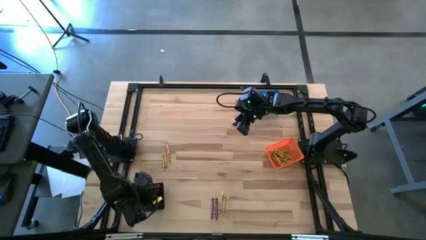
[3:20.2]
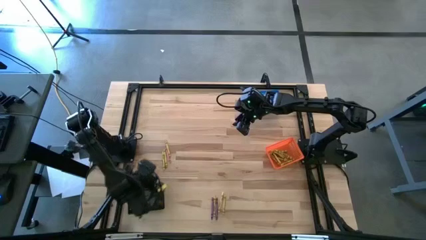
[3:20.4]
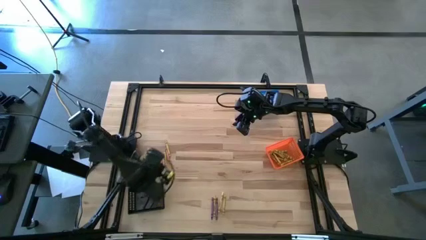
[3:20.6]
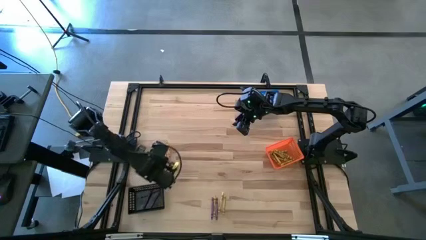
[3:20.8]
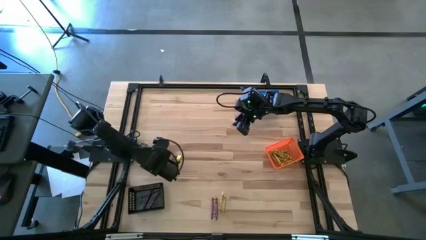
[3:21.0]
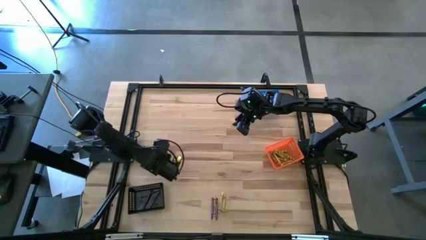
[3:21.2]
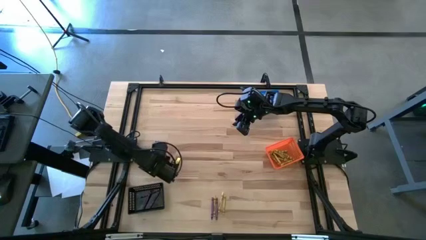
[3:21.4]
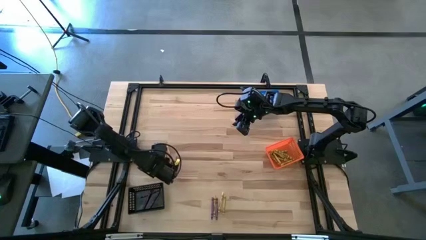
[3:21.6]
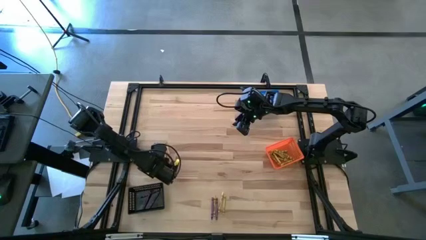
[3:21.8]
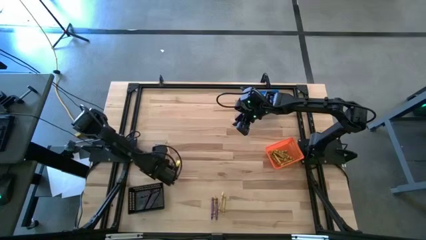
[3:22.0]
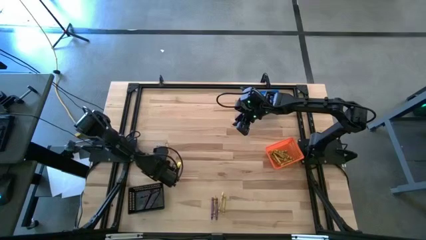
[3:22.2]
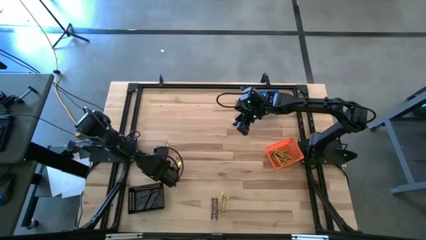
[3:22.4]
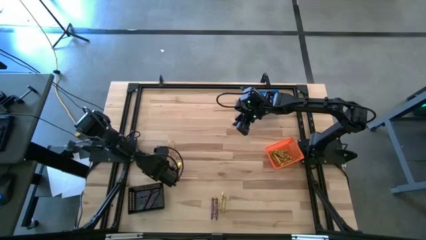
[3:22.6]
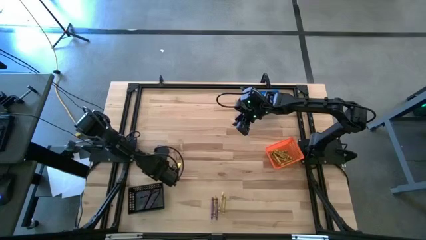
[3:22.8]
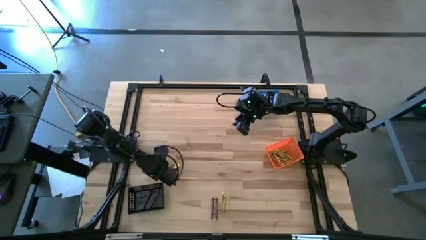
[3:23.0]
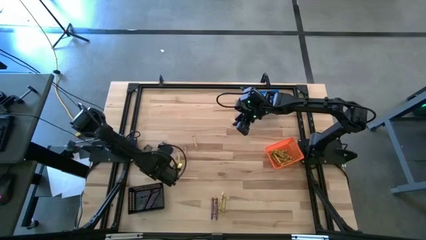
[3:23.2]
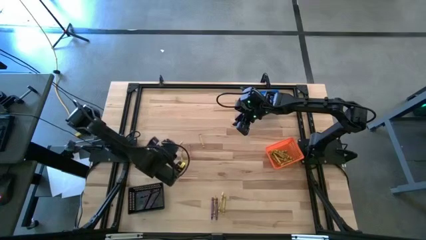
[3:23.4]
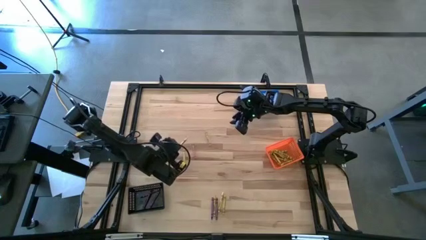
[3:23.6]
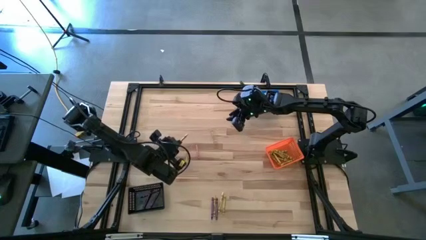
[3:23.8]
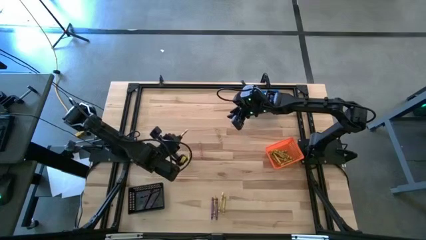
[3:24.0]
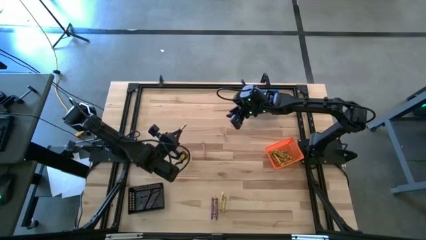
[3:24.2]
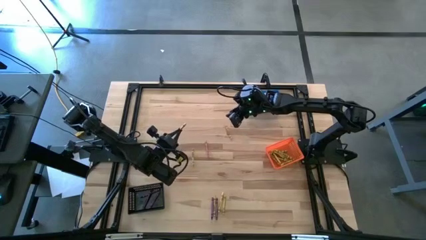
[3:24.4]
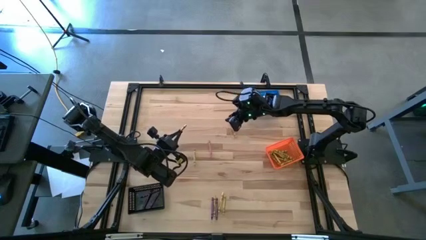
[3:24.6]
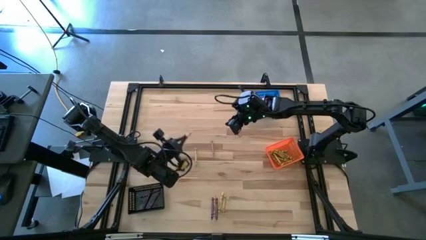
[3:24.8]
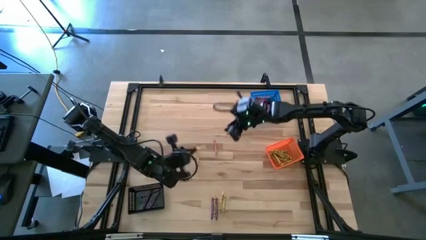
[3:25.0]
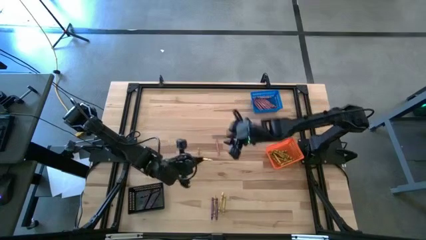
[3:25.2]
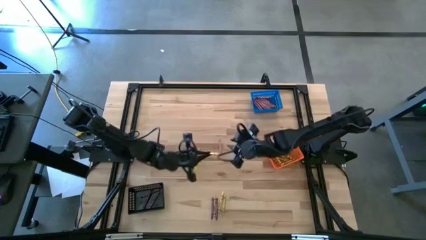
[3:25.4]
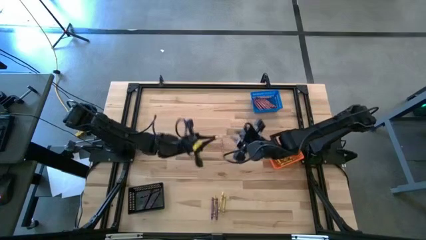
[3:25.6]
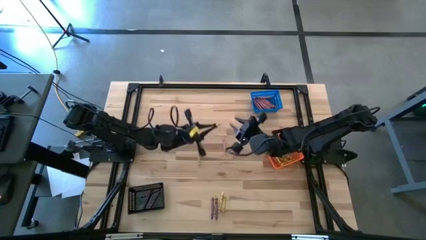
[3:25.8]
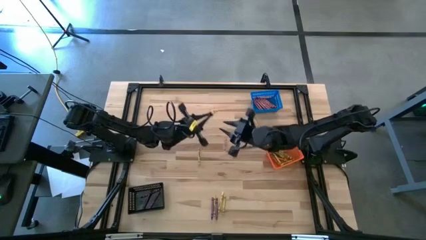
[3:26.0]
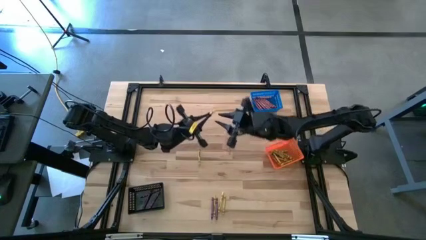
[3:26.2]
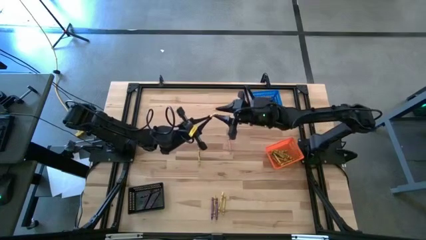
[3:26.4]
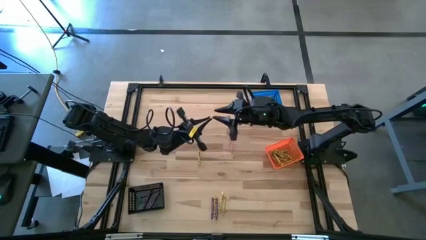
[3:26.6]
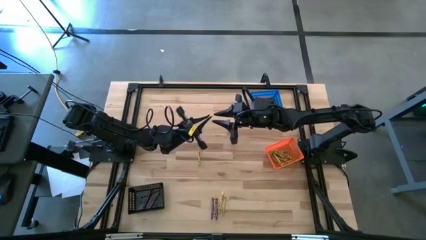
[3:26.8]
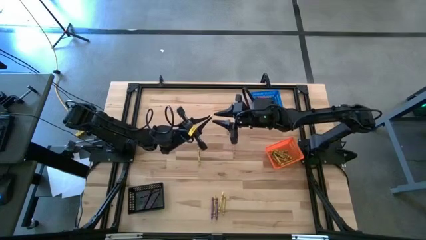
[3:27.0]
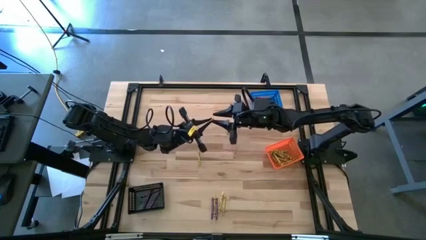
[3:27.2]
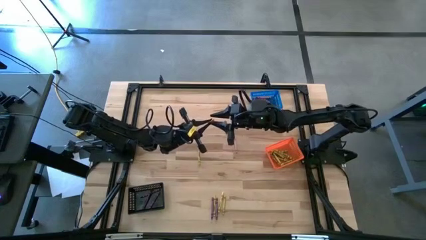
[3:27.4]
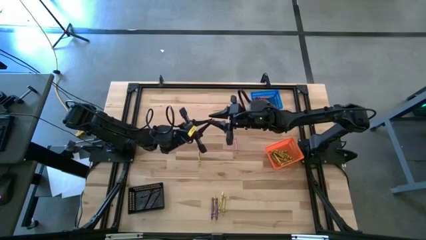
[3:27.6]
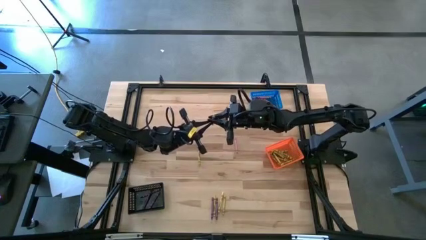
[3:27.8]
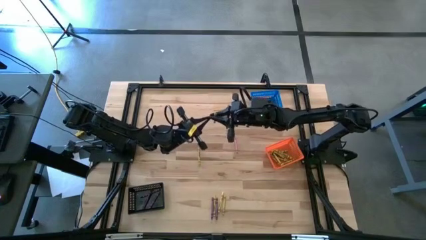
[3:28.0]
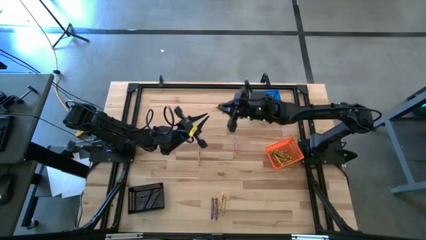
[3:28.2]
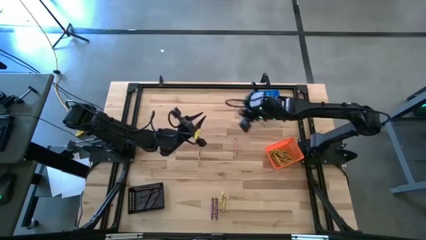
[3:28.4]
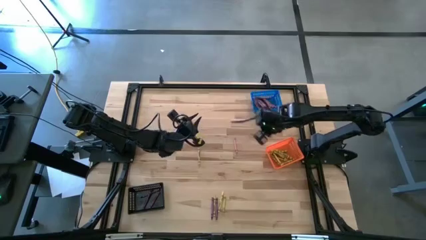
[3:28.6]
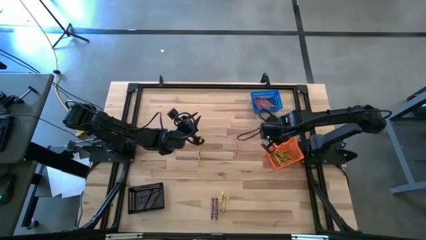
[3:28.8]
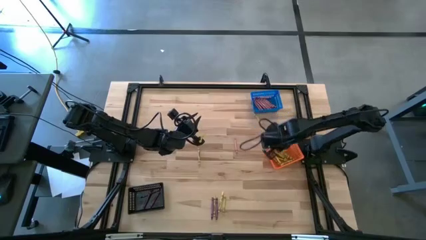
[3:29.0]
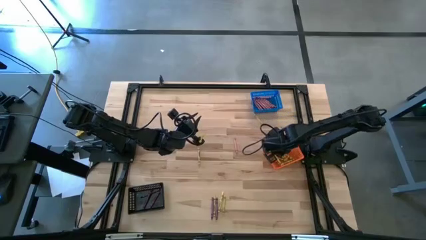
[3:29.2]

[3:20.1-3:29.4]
Task: Sort crayons
Put the yellow crayon into the orange basket

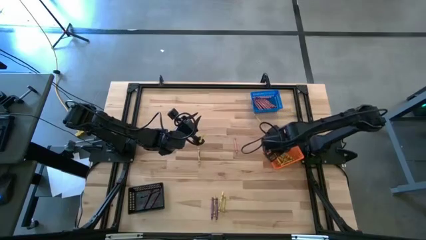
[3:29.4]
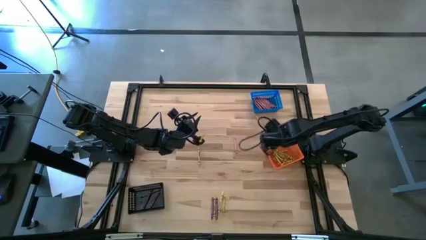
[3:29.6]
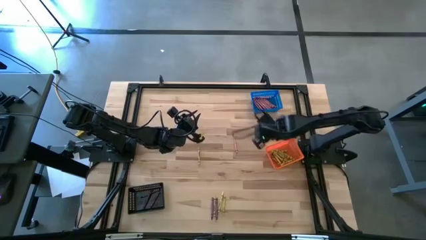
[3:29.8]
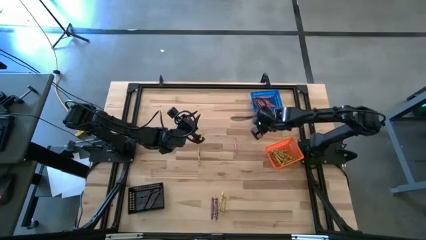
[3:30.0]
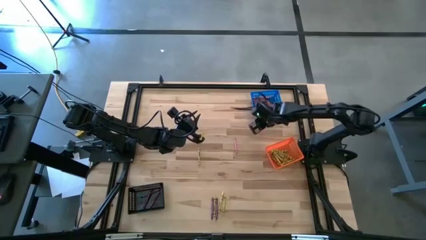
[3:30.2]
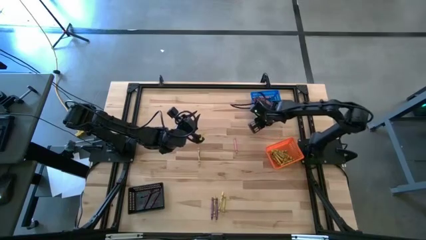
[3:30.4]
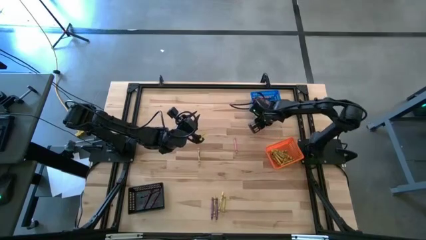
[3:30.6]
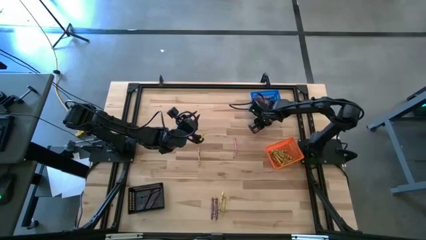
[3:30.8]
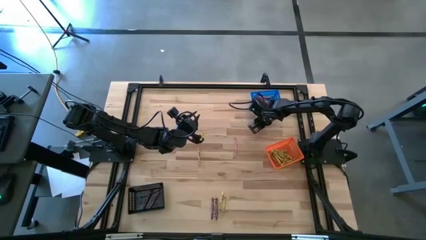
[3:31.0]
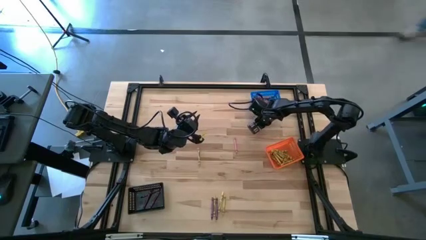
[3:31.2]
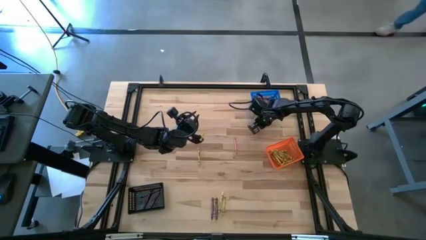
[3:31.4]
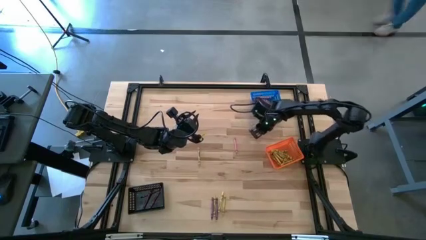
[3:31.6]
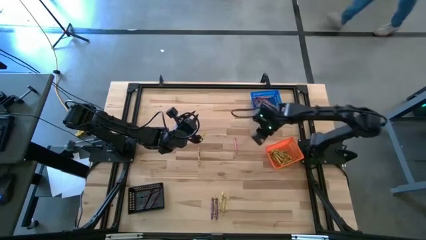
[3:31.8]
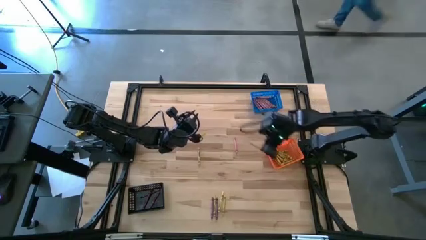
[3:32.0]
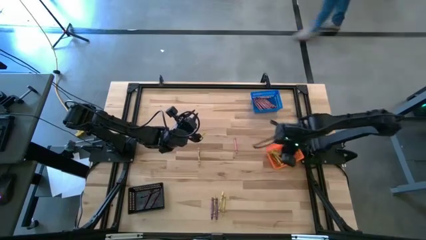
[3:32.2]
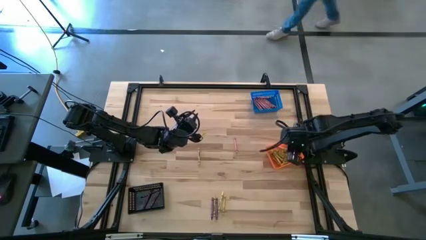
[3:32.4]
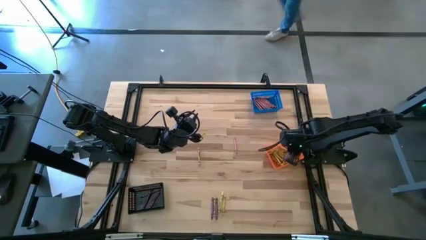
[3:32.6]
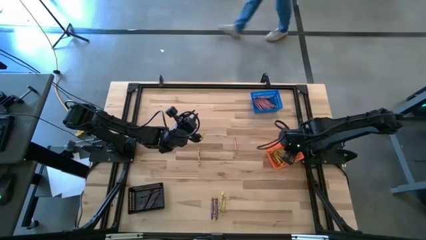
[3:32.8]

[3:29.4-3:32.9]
Put the yellow crayon into the orange basket

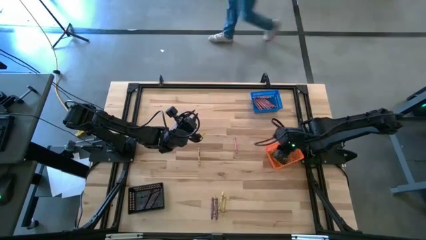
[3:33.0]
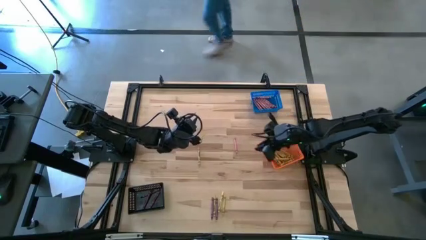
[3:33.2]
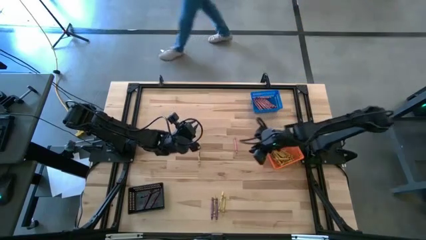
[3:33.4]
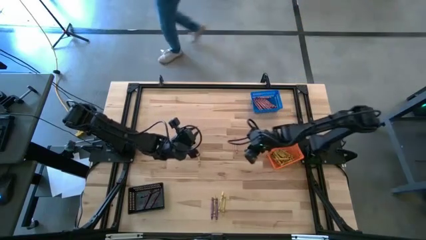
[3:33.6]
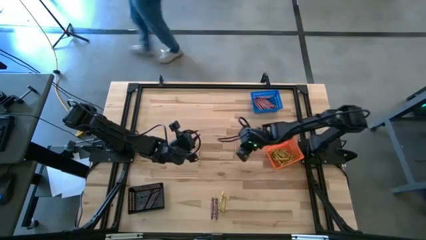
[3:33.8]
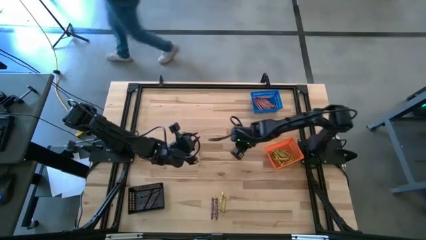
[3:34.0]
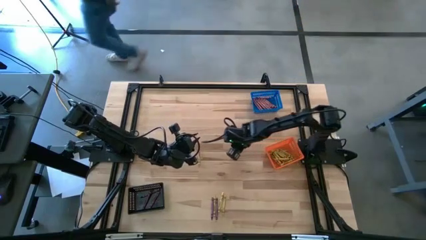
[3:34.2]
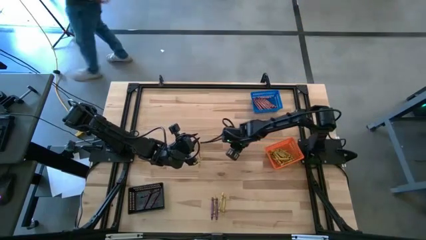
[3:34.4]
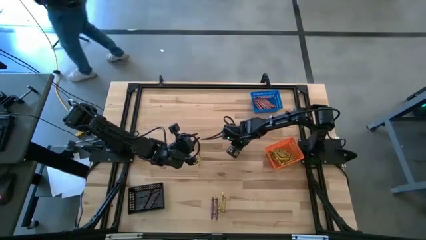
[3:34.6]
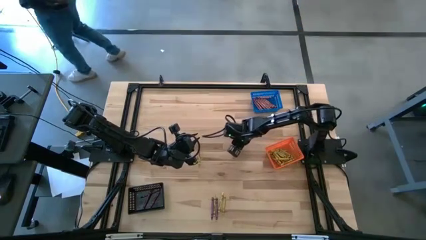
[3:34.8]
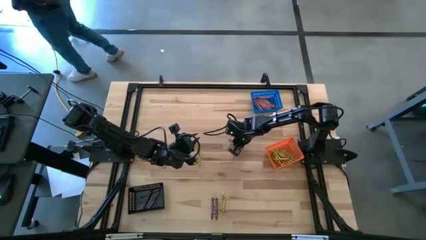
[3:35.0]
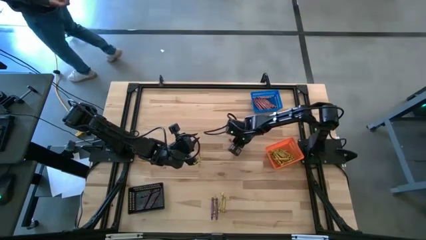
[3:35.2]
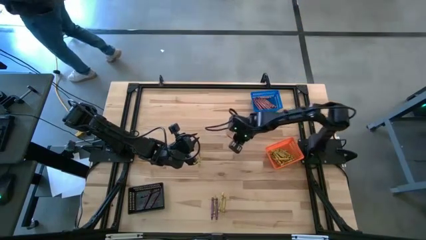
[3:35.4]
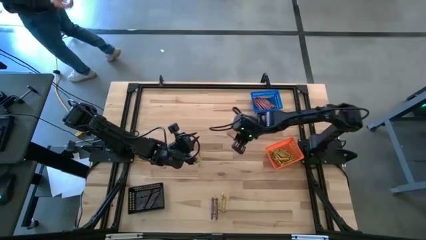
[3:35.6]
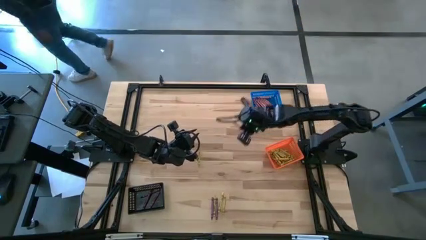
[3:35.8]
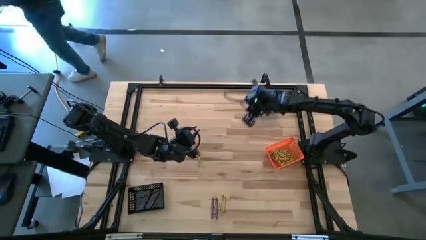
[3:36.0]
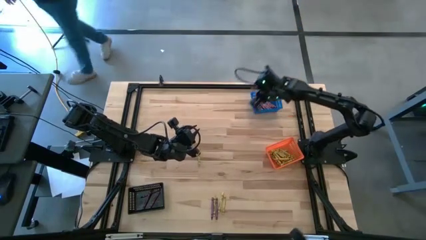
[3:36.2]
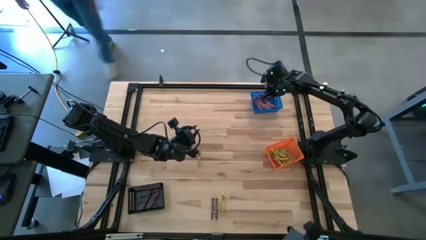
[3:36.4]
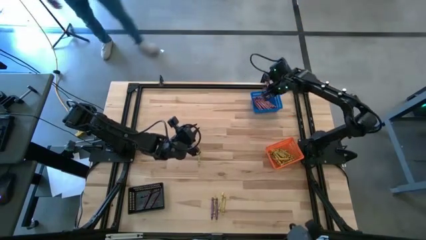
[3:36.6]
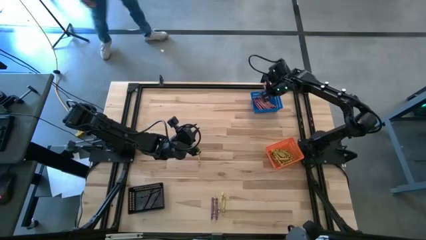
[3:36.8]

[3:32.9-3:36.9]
Put the red crayon into the blue basket
